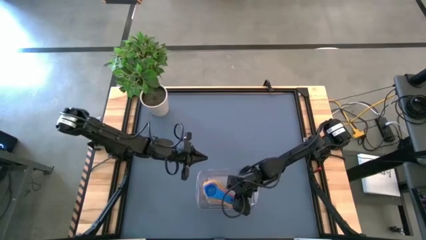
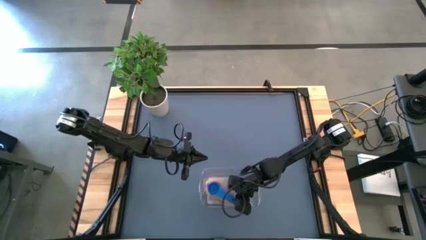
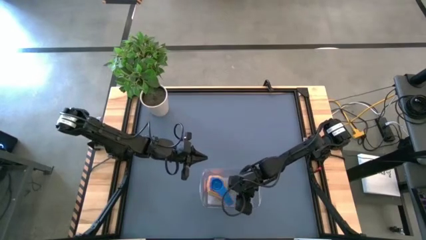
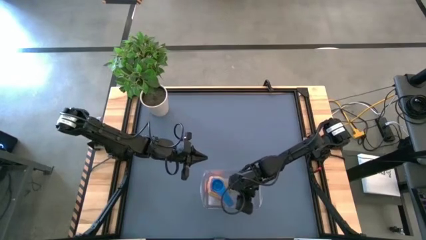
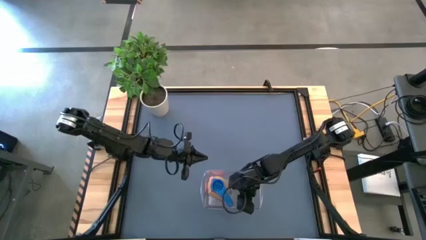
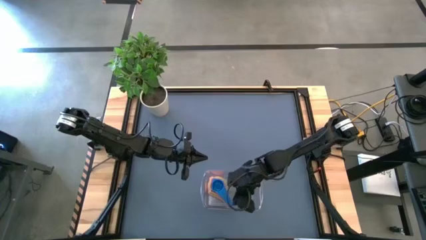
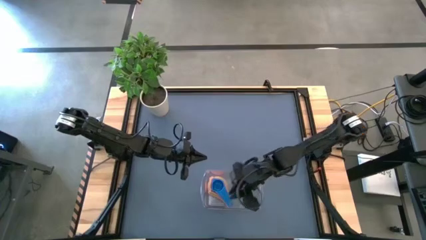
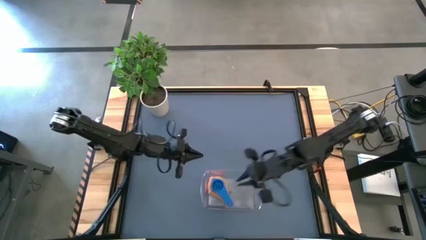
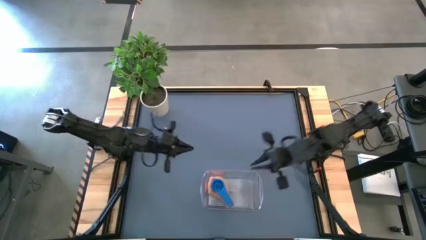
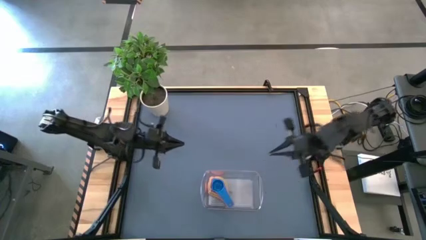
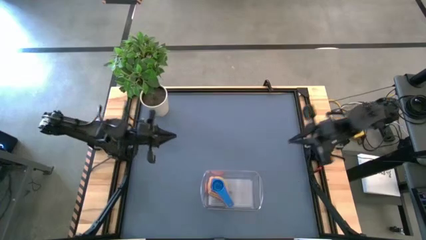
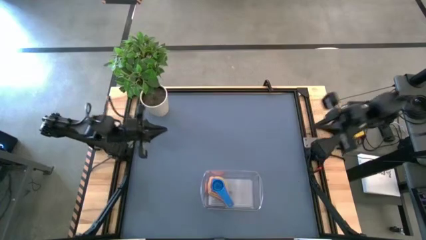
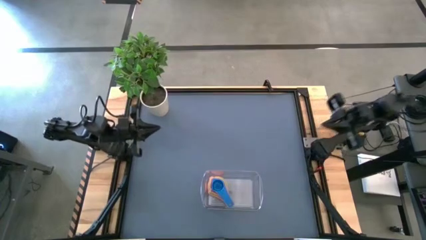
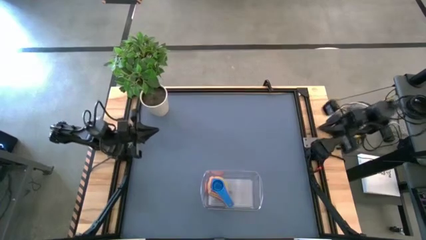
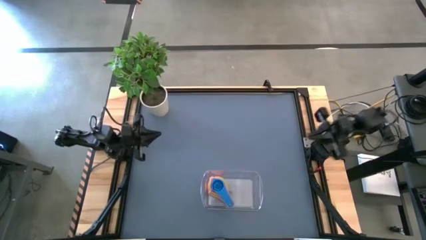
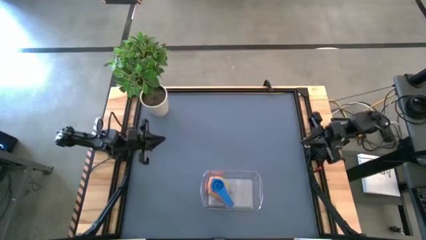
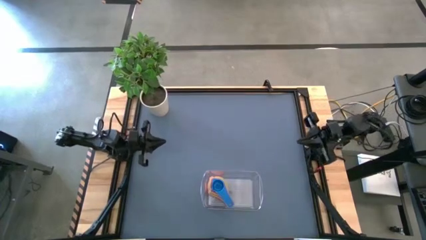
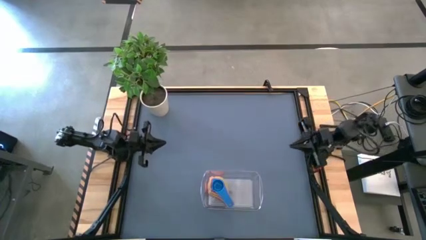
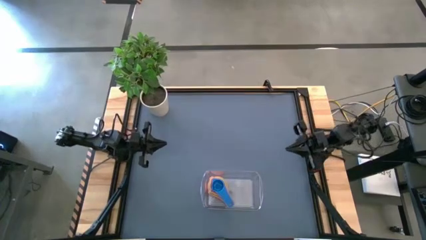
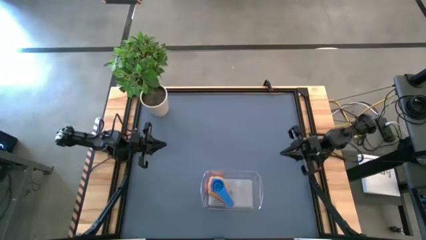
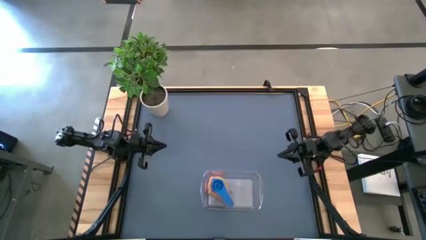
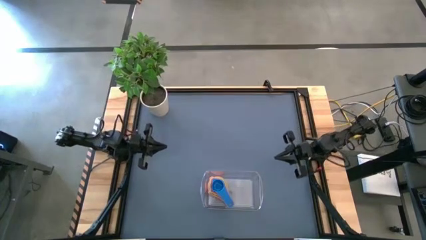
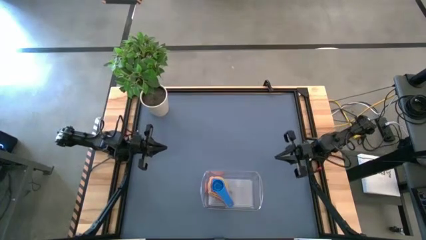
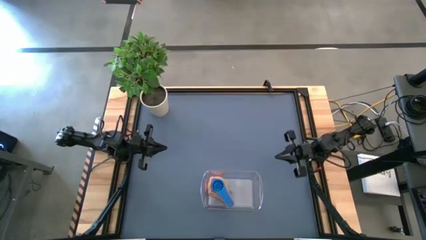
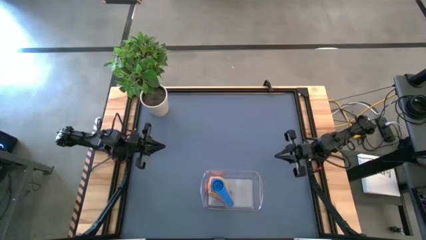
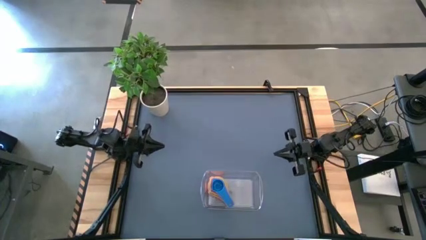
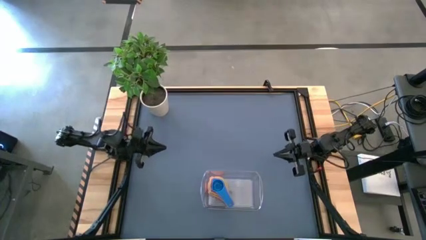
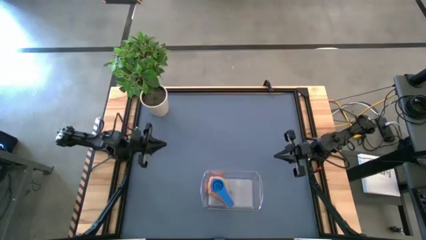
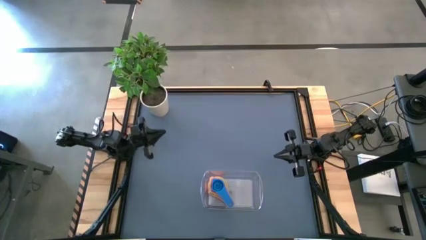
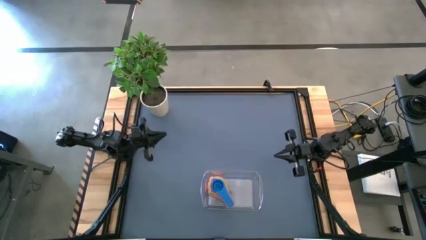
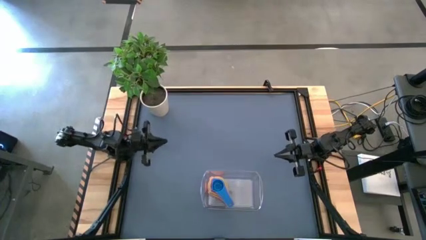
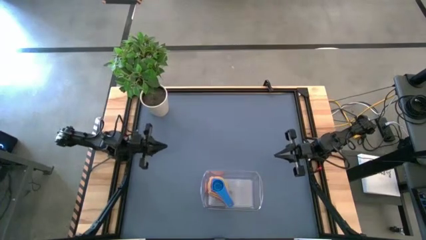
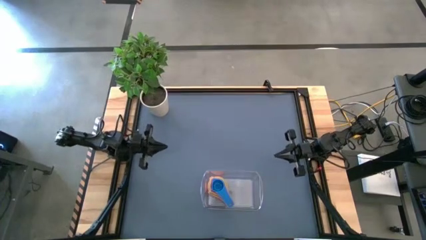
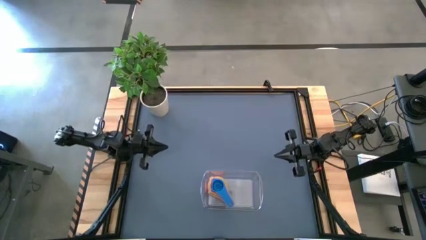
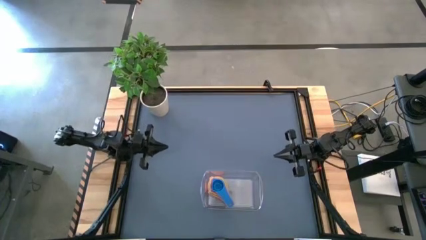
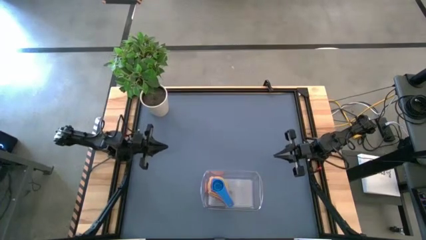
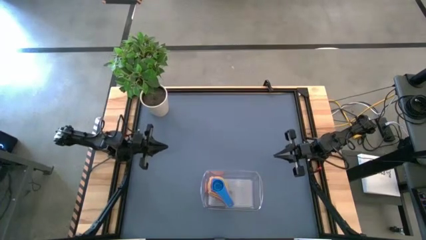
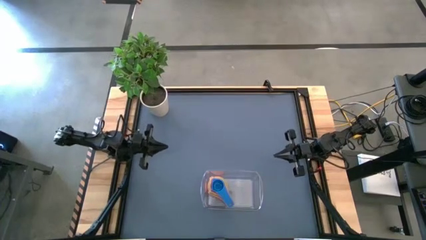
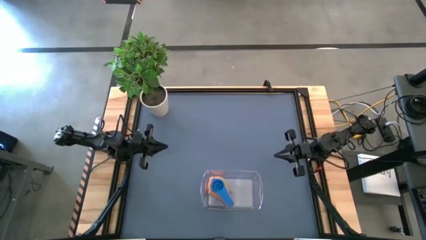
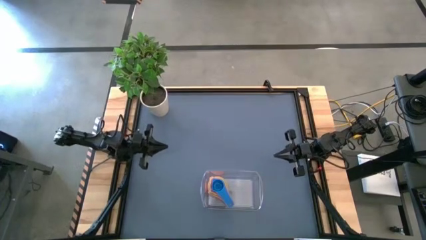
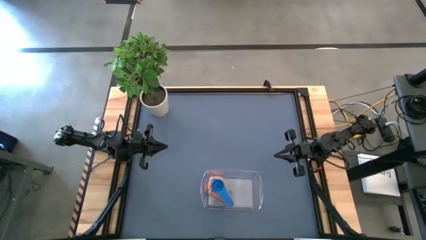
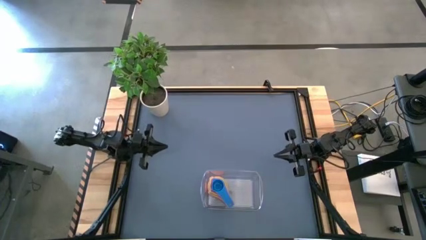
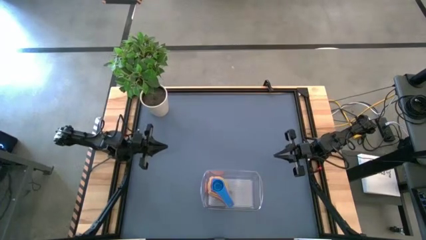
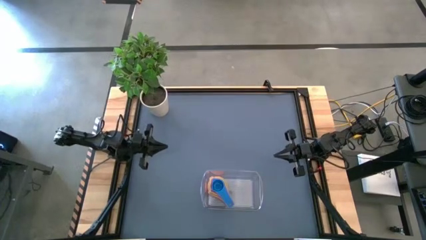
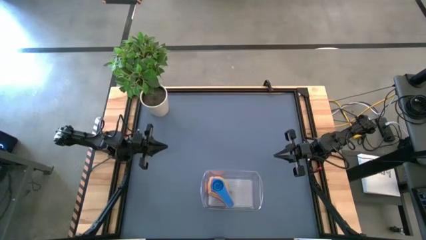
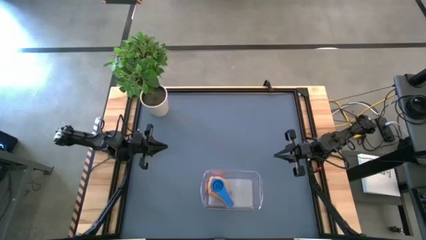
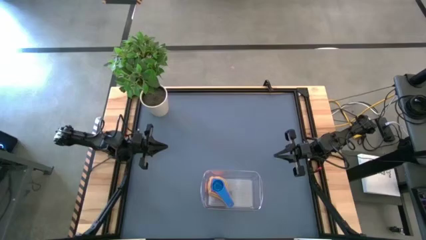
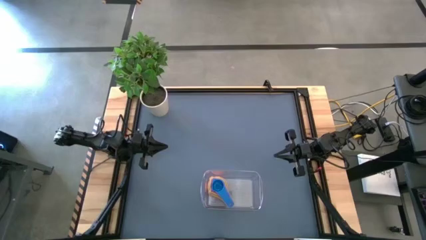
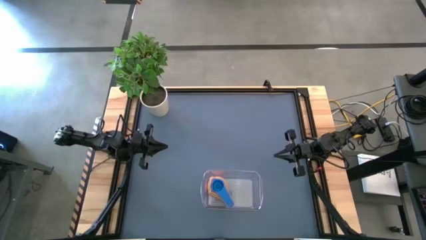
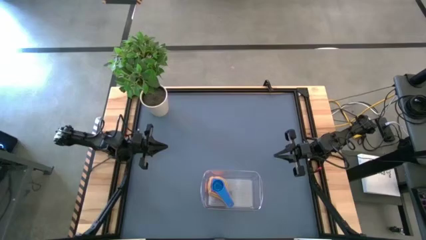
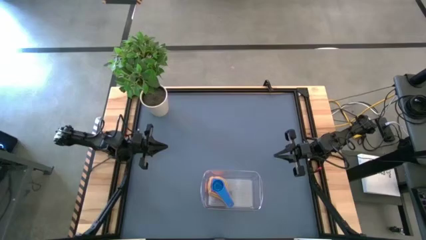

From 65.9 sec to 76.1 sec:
Task: Nest measuring cups in basket
Return to Home Position
